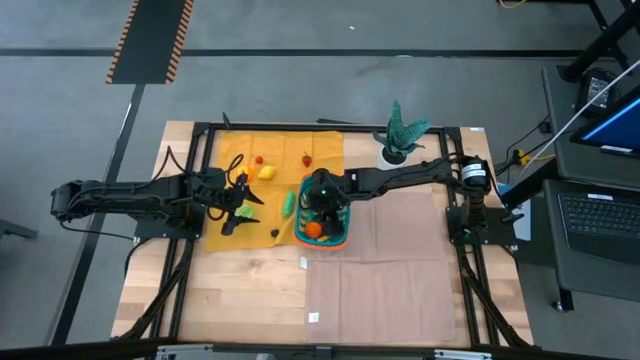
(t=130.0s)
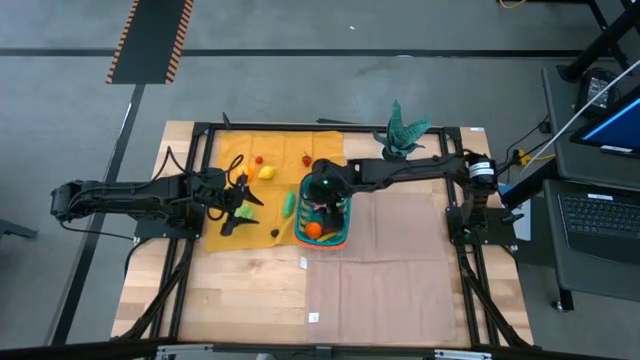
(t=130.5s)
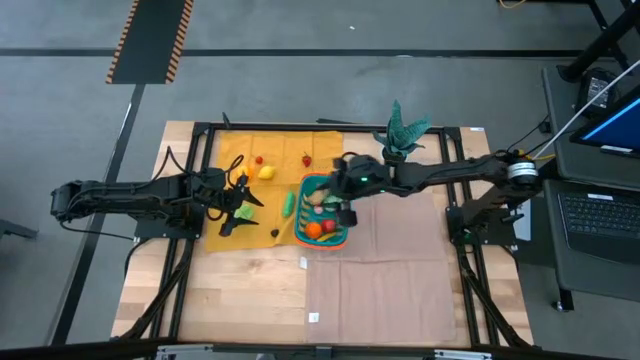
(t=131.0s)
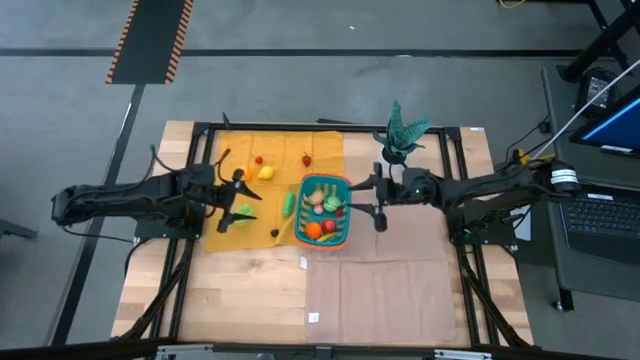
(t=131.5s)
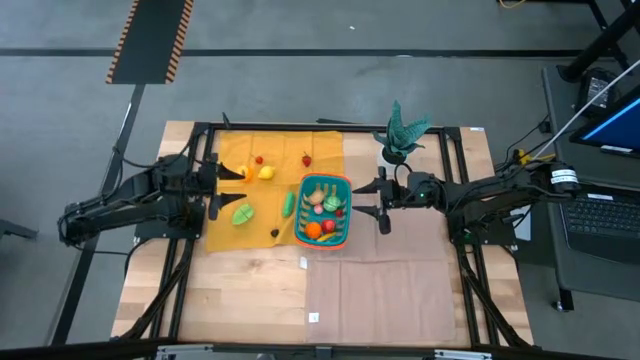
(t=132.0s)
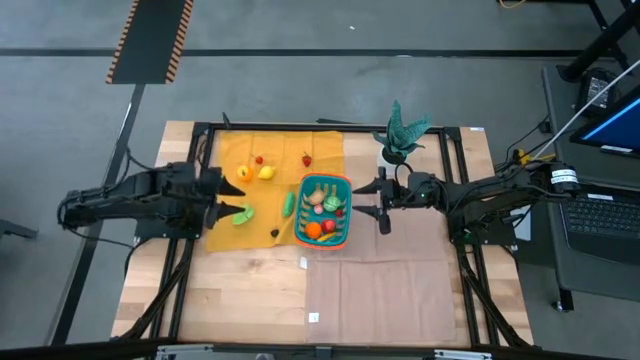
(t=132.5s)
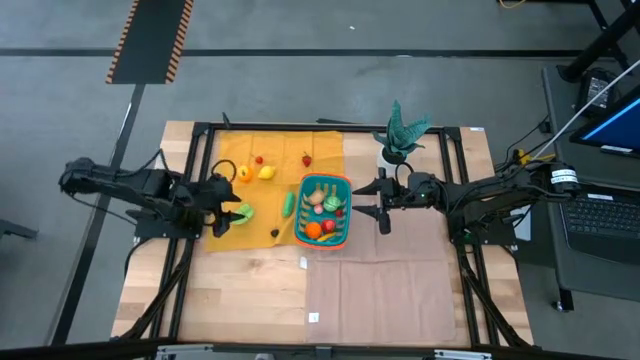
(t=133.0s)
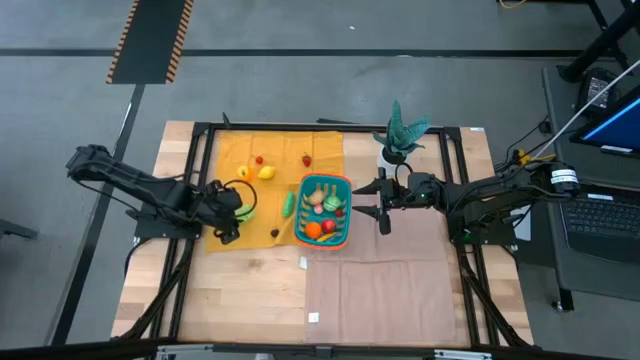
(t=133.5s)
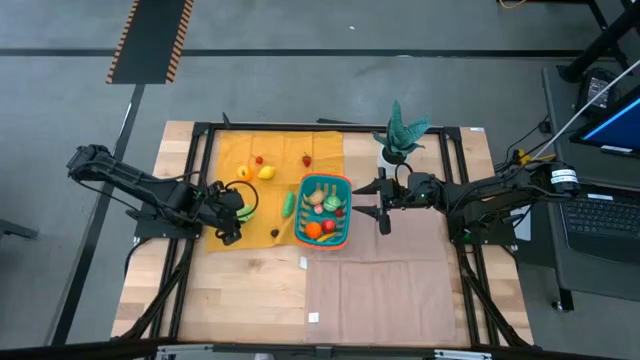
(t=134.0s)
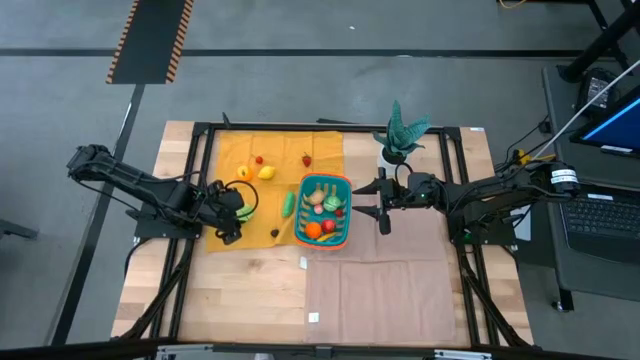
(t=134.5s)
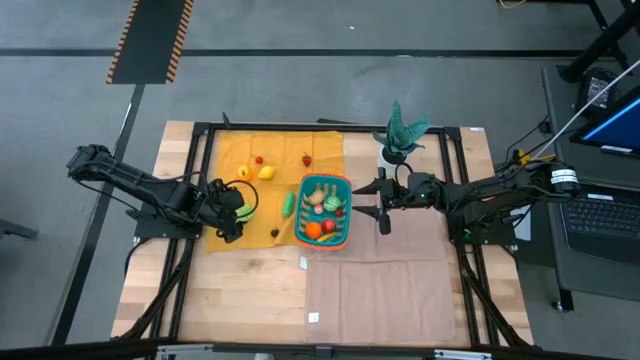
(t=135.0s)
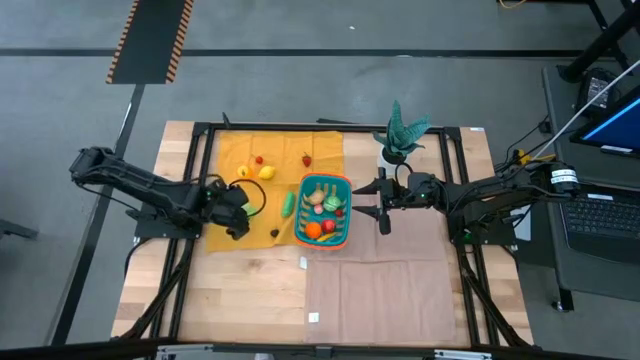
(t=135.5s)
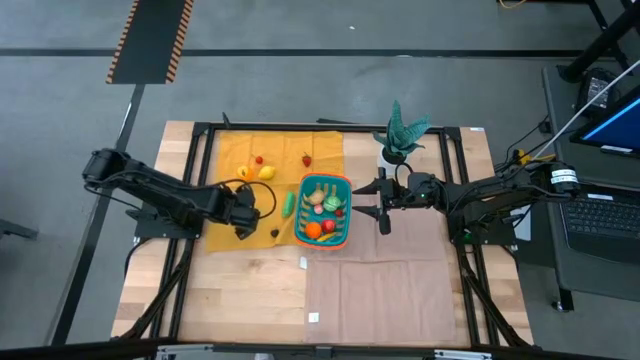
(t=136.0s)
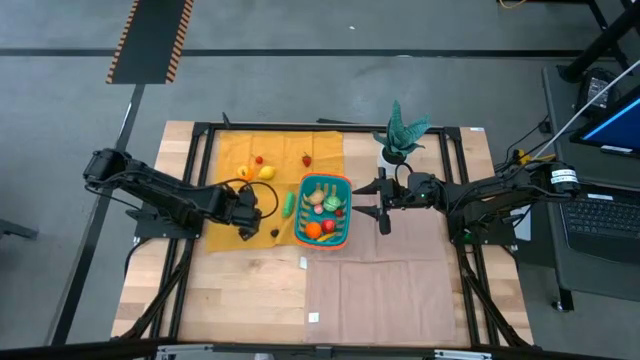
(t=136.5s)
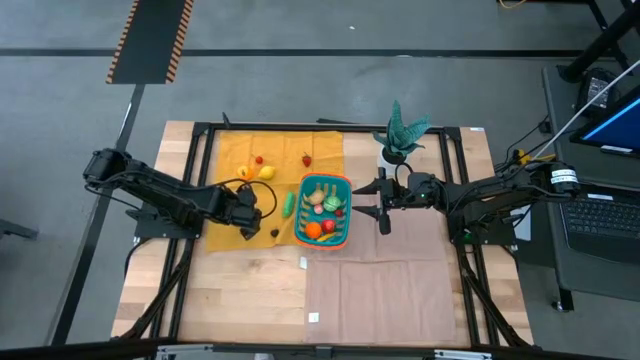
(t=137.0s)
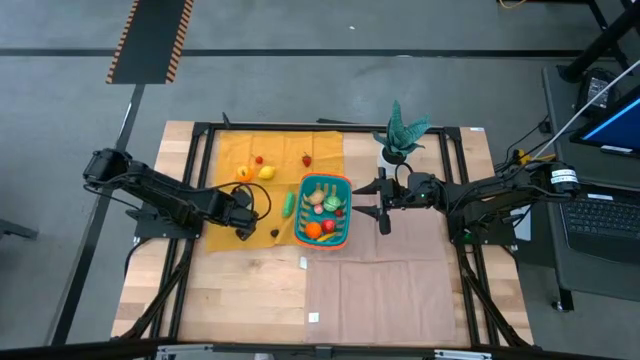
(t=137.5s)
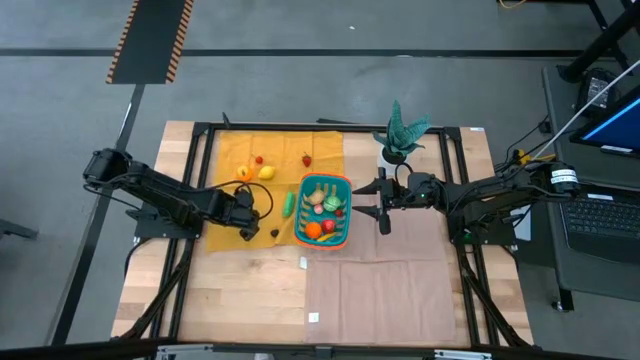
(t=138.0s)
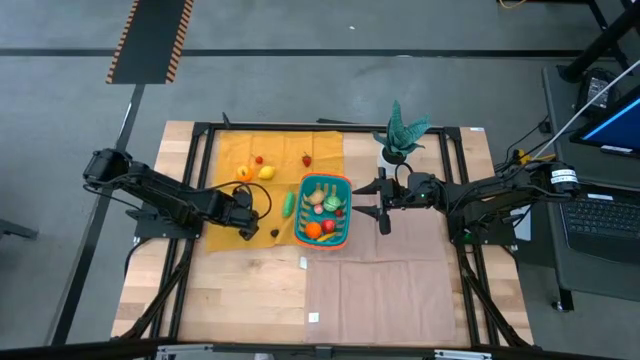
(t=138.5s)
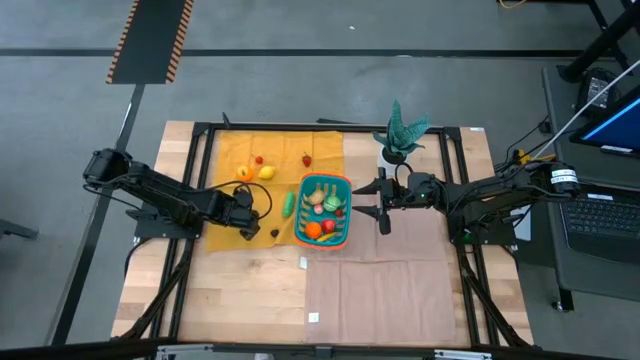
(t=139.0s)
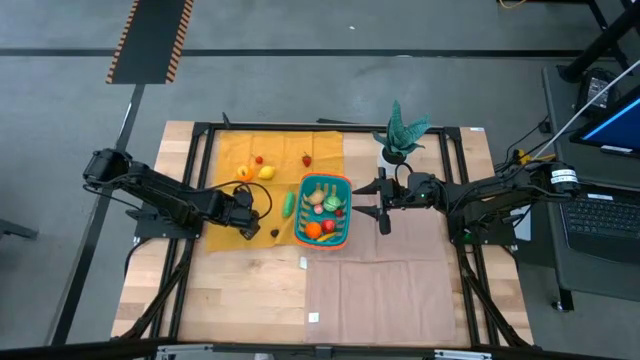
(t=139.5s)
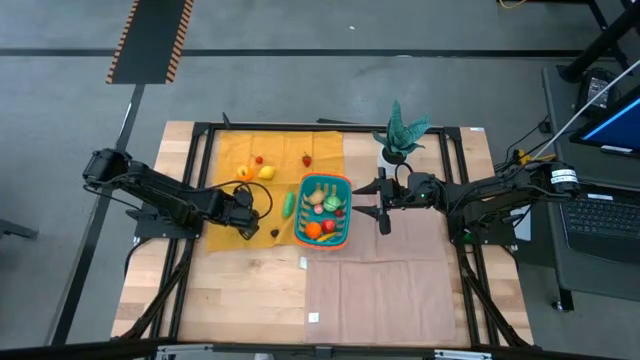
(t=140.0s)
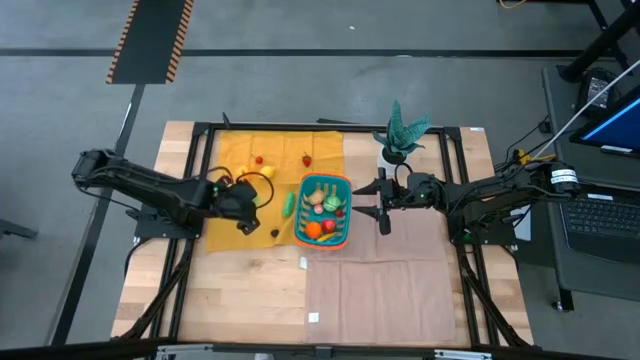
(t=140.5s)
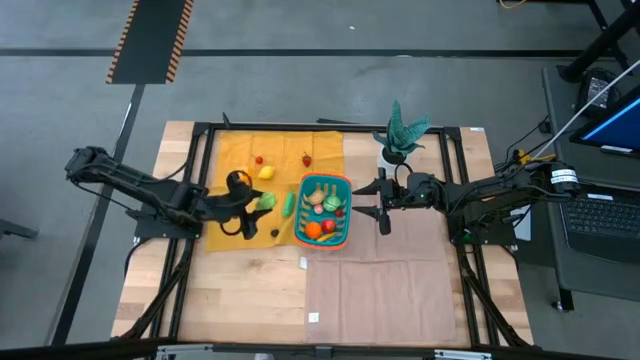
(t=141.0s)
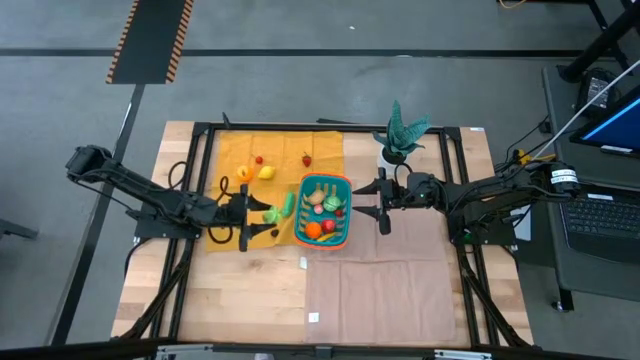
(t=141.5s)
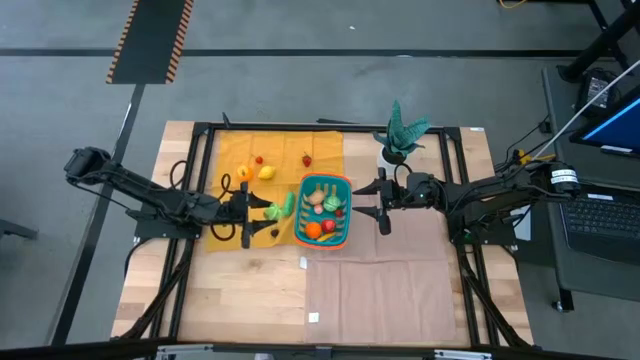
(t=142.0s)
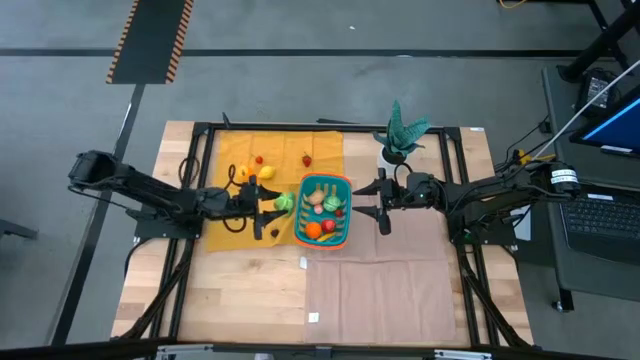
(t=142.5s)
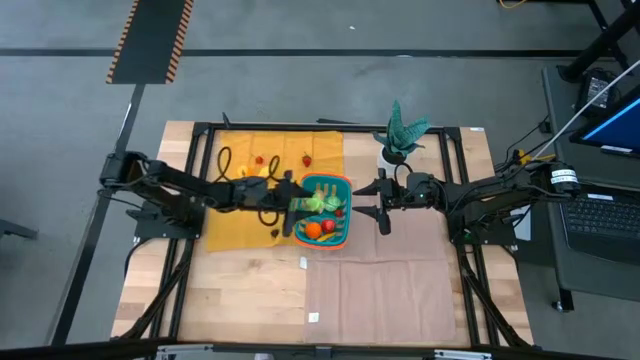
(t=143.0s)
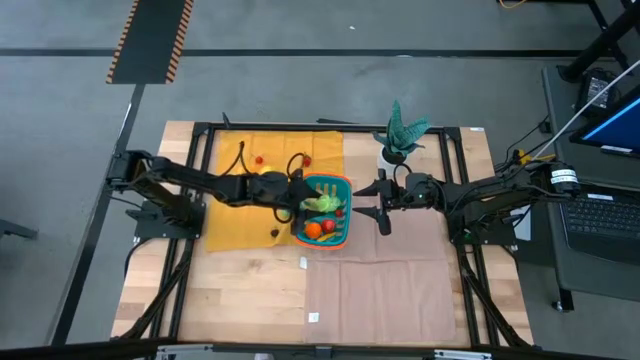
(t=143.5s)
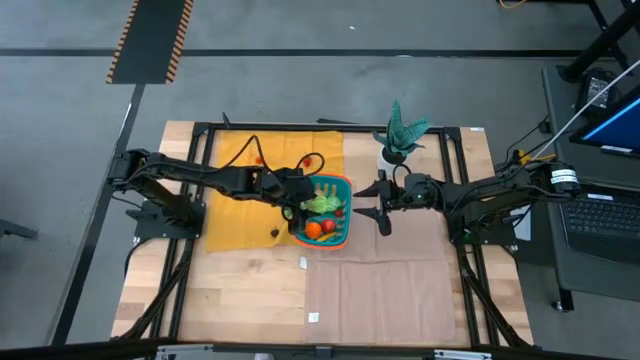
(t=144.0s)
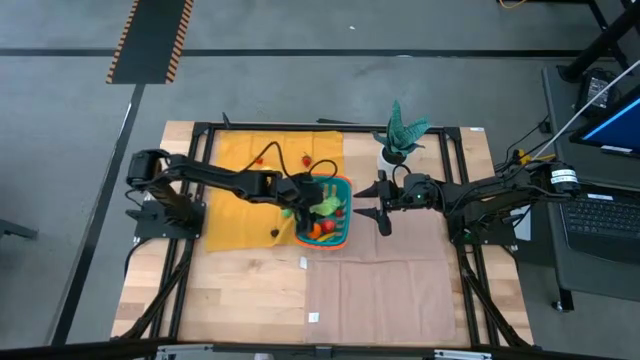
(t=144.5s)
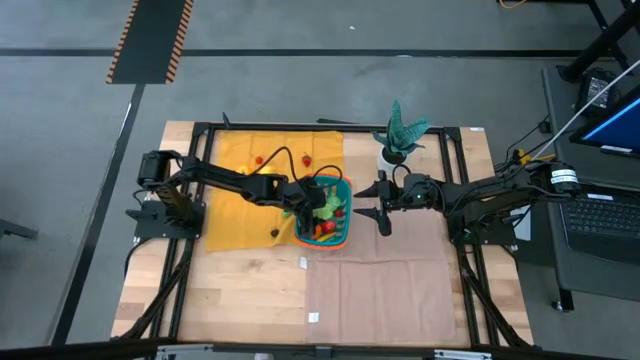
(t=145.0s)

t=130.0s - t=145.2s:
Task: Pick and placing Produce into tupperware
Put the starfruit into the basket

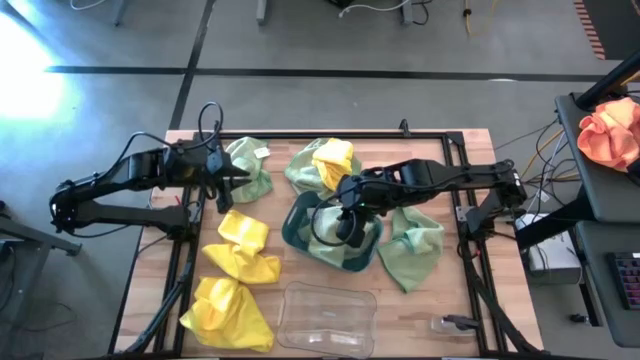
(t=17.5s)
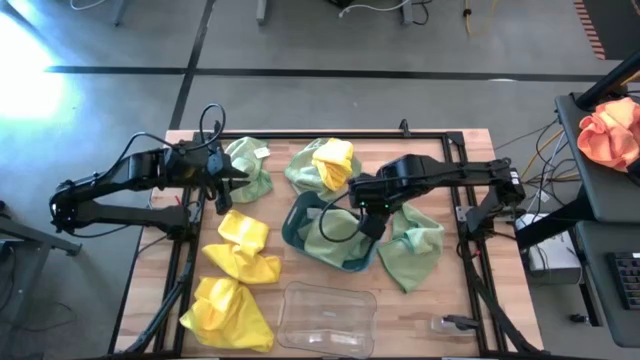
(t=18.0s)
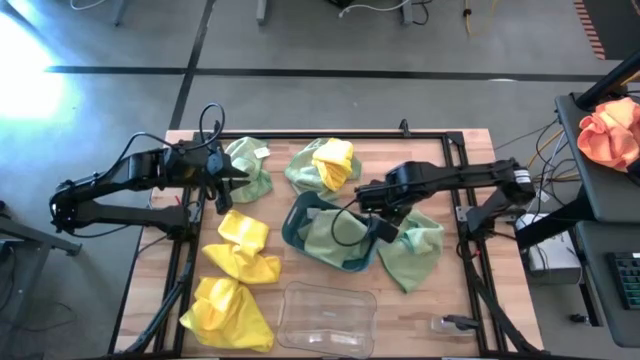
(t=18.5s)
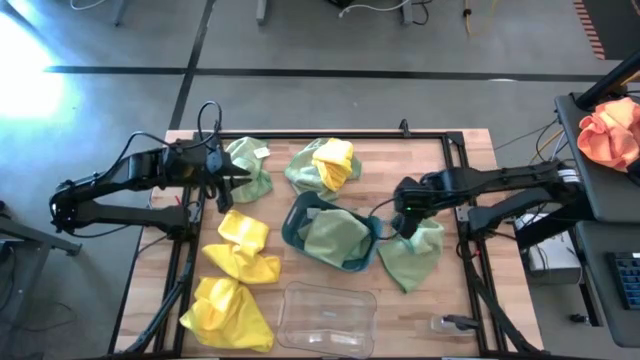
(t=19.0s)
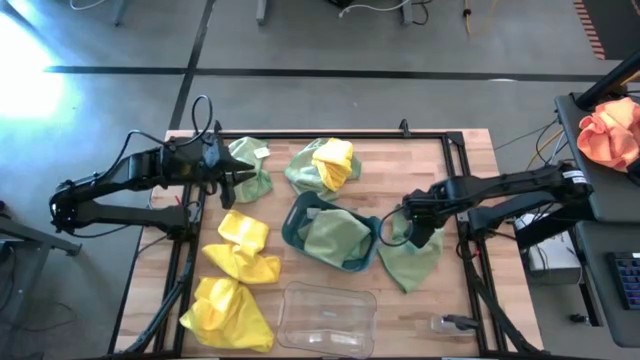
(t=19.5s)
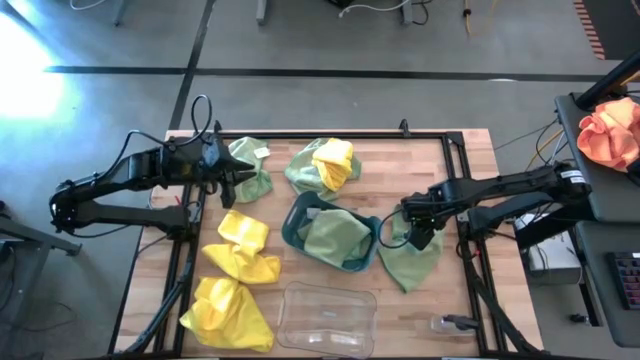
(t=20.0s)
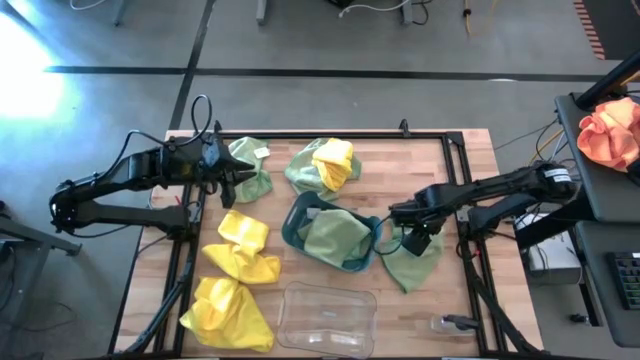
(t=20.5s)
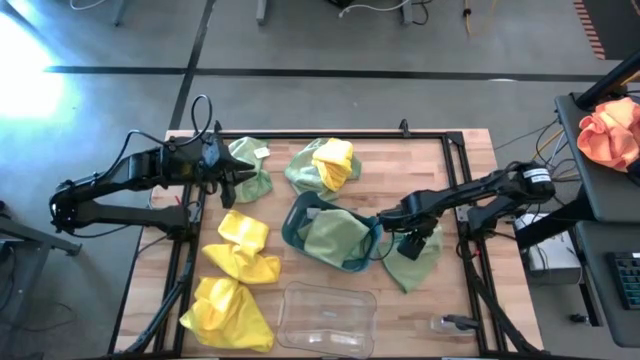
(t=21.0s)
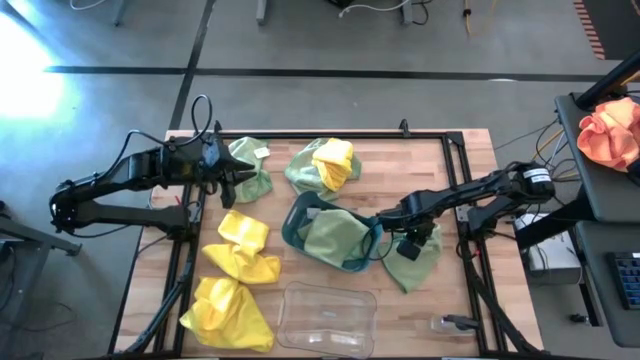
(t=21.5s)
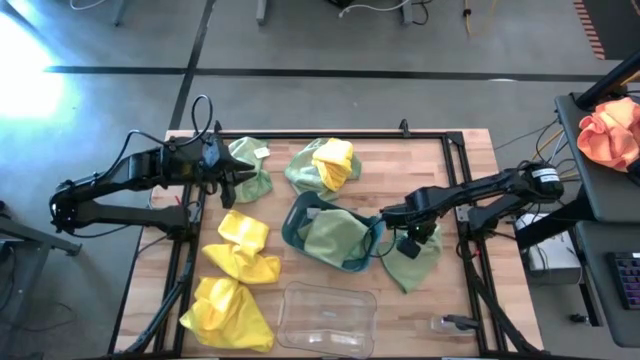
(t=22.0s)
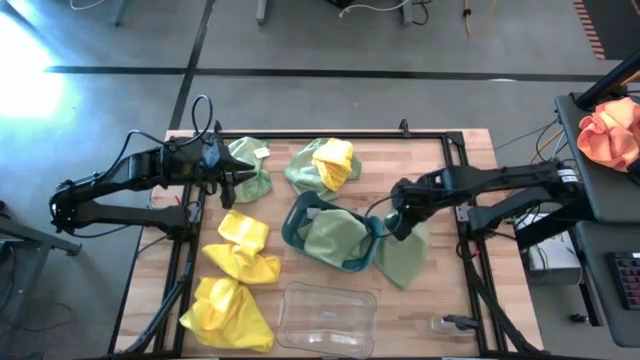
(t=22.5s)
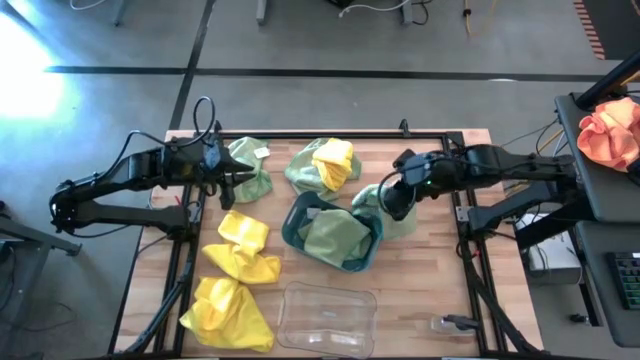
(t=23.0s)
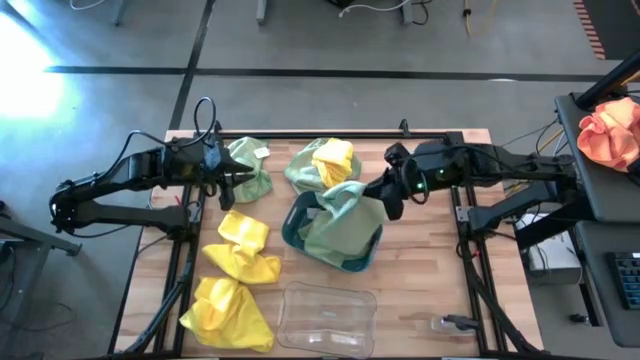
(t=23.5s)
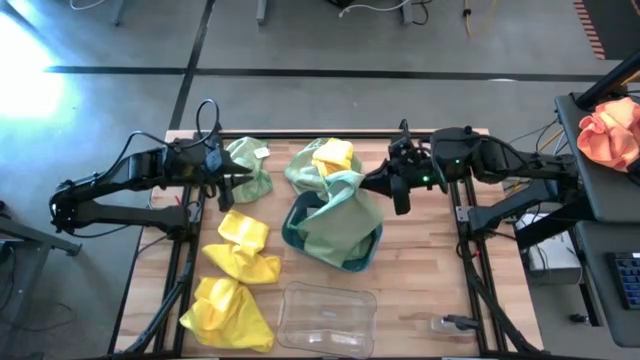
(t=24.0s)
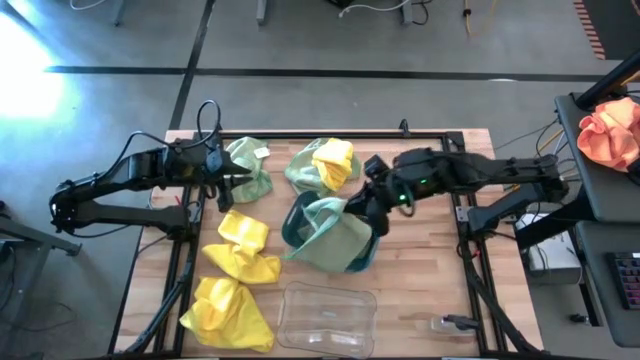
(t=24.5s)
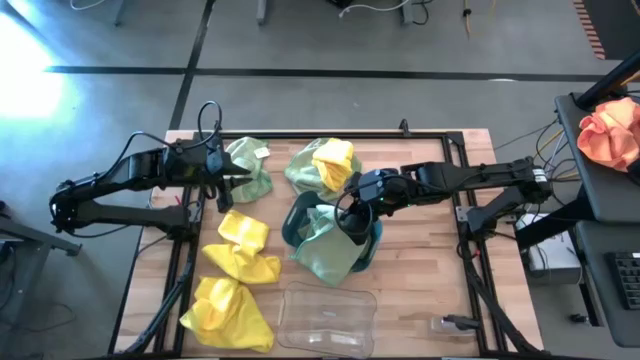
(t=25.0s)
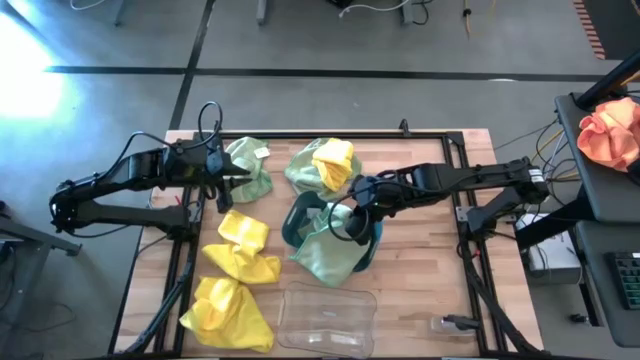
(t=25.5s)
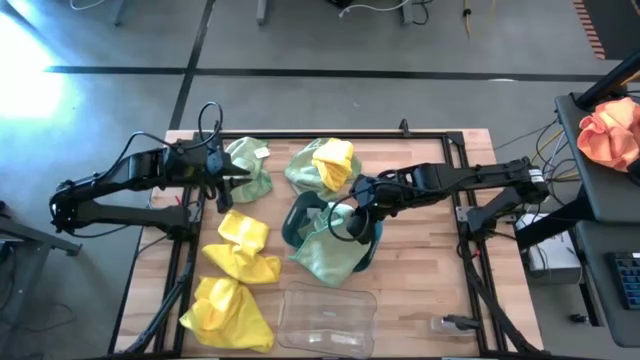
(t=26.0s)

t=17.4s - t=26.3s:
Task: Sort microfiber towel by color & place in baskets
Put the bottom microfiber cloth into the blue bin
